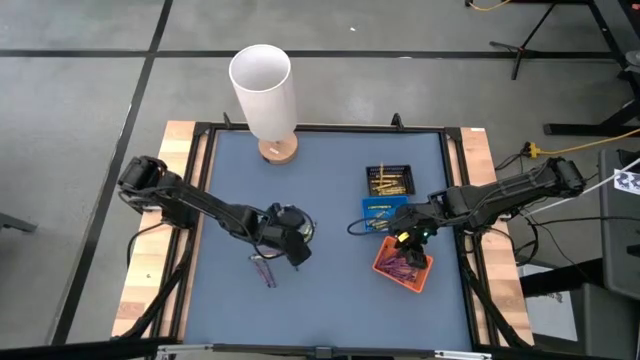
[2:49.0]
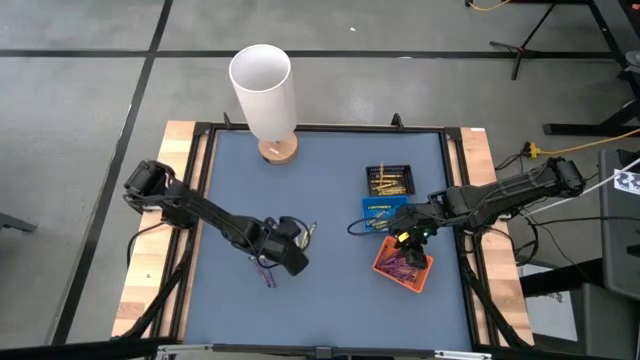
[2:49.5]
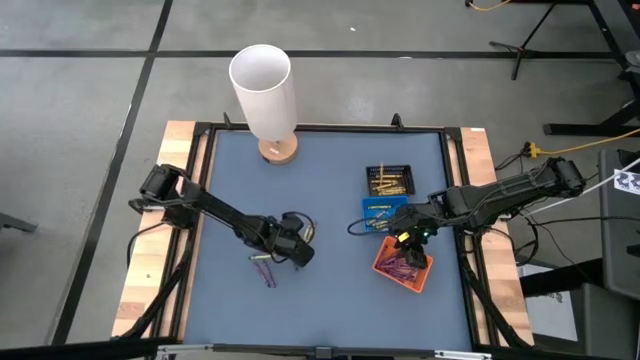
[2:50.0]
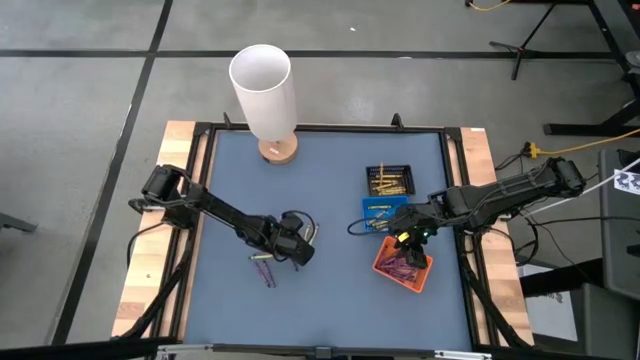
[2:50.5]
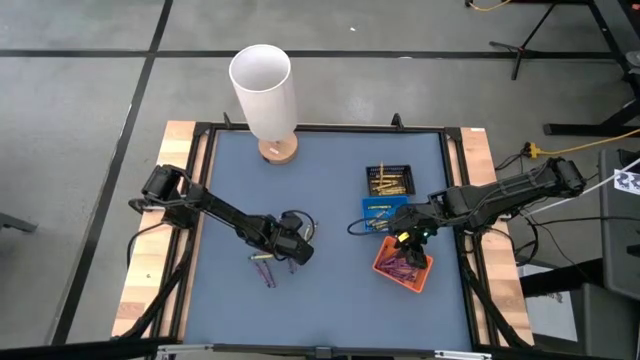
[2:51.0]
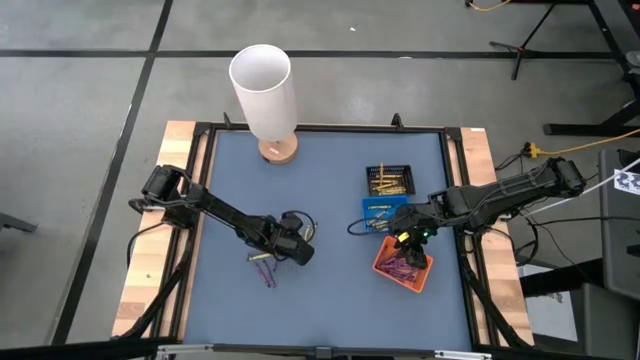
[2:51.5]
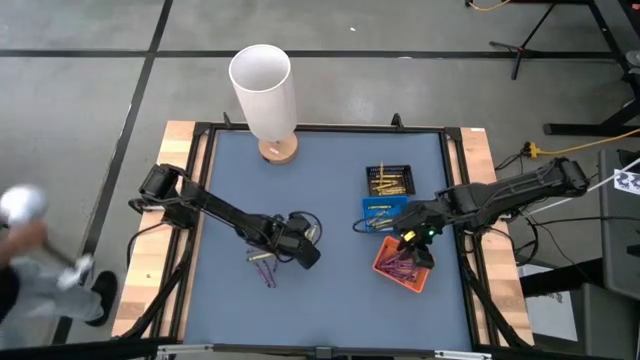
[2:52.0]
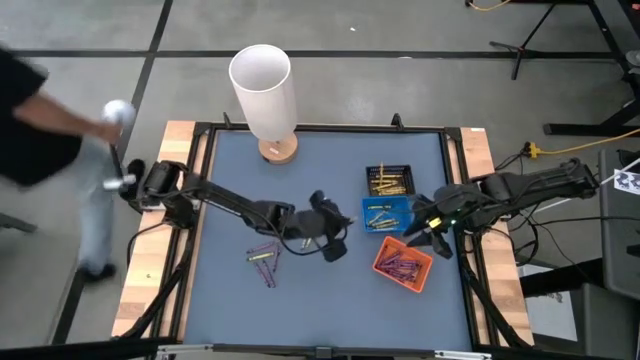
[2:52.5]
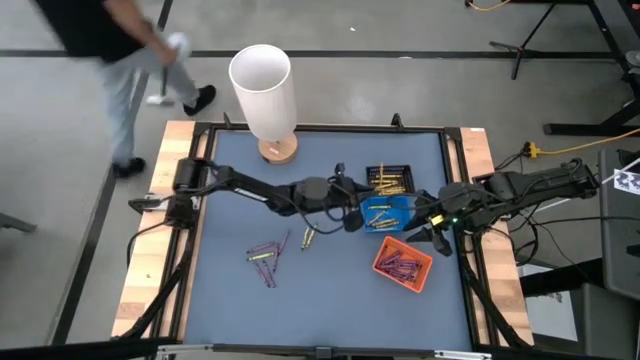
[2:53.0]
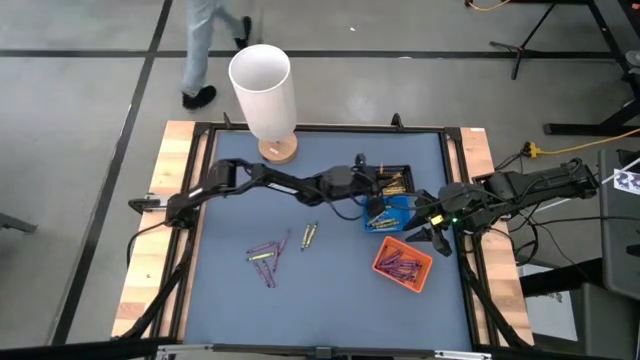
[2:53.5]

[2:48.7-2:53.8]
Task: Sort crayons
Put the yellow crayon into the black bin

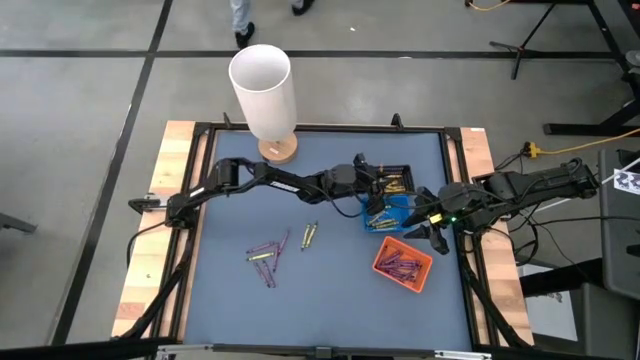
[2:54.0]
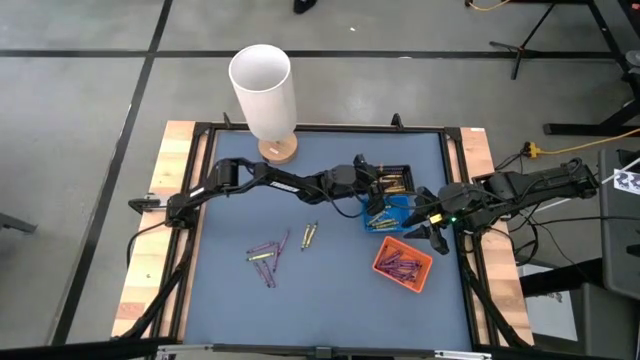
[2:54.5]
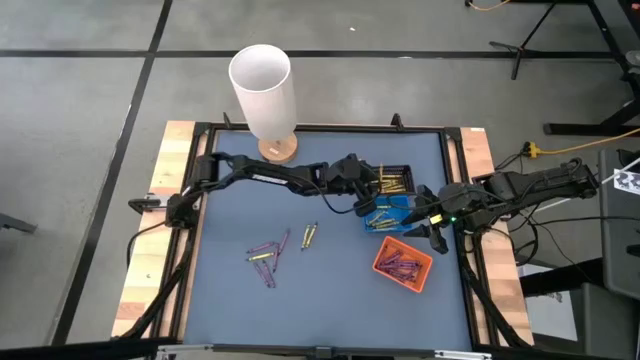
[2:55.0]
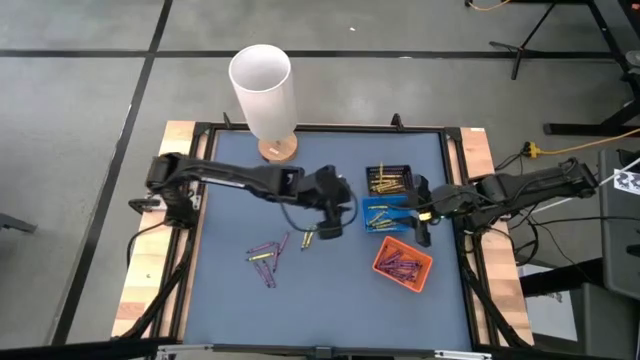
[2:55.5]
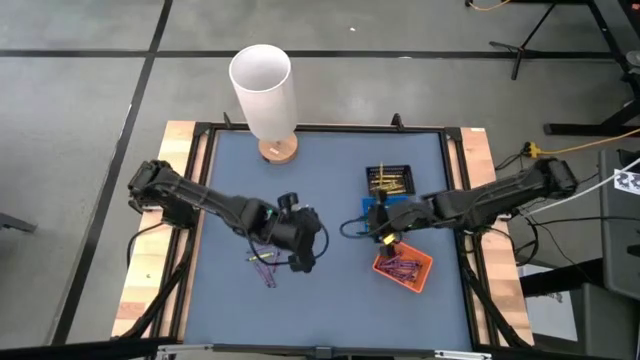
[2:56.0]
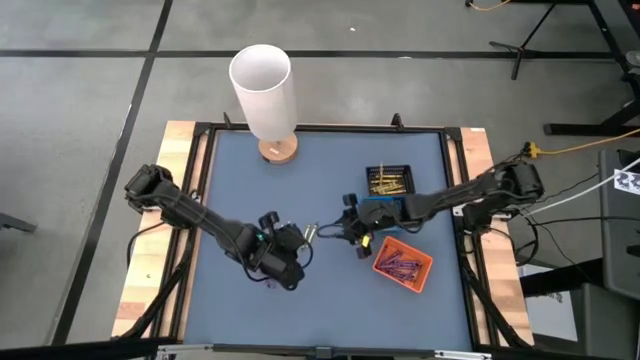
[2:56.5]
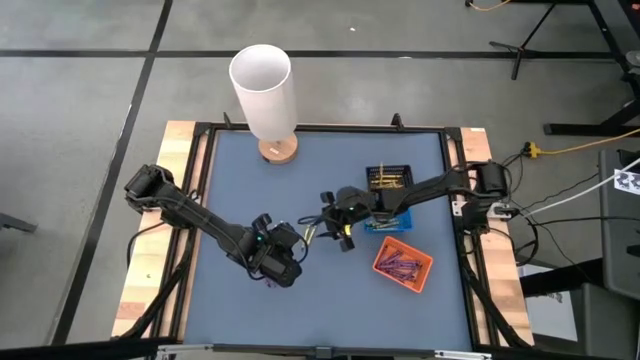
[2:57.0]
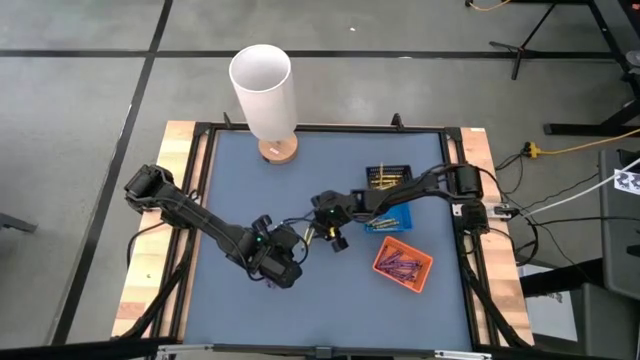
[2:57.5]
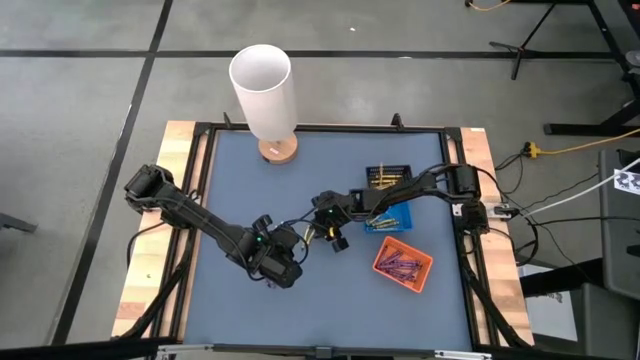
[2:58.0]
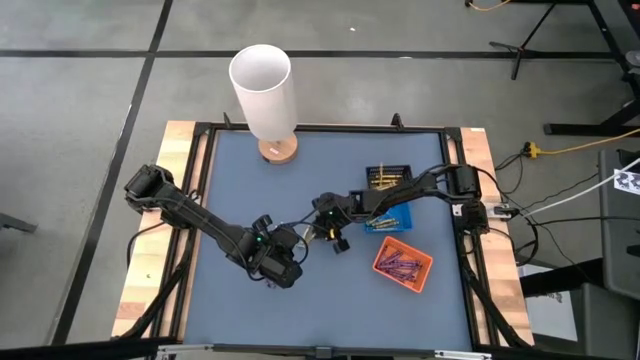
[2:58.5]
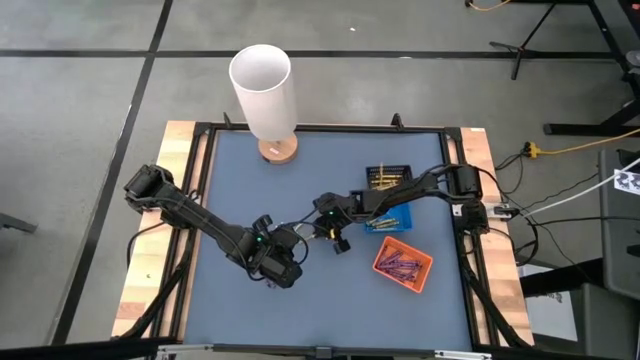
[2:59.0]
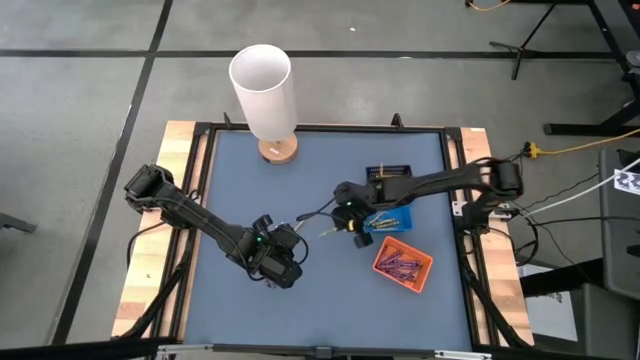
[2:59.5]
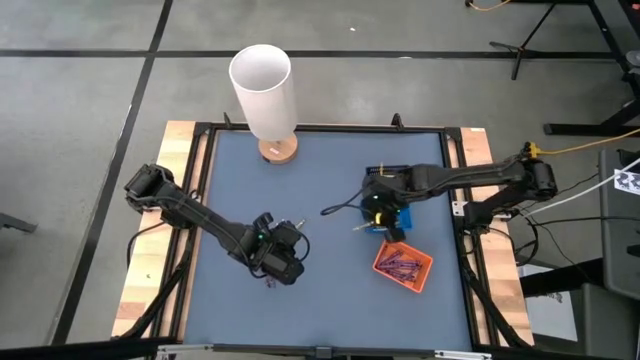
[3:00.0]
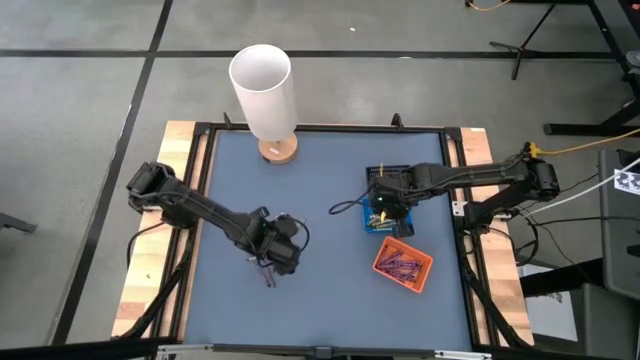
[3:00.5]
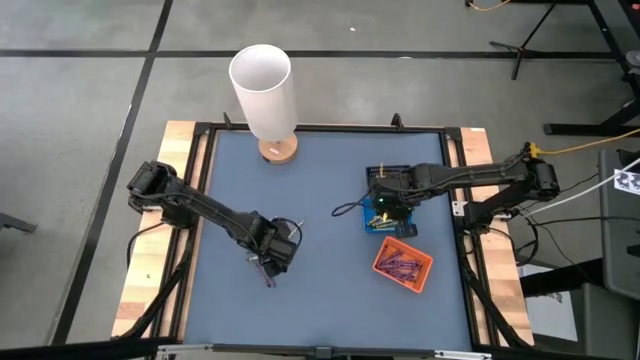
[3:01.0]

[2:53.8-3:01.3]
Put the green crayon into the blue bin

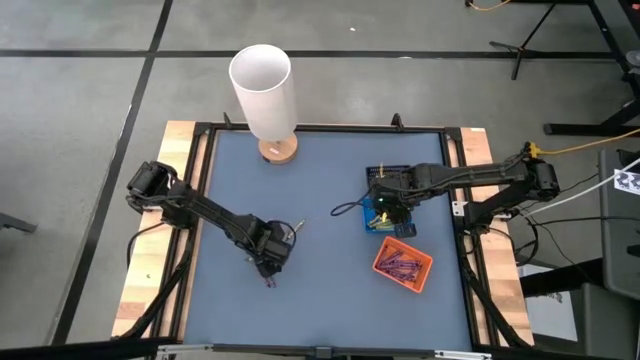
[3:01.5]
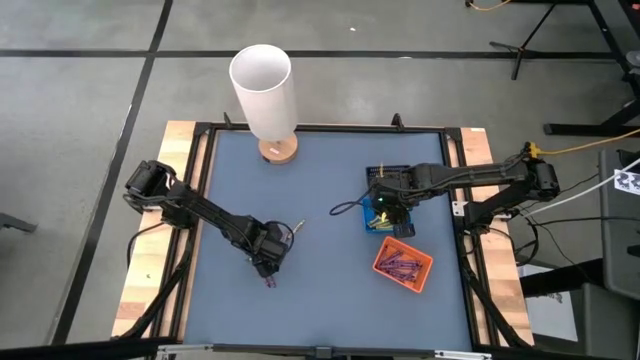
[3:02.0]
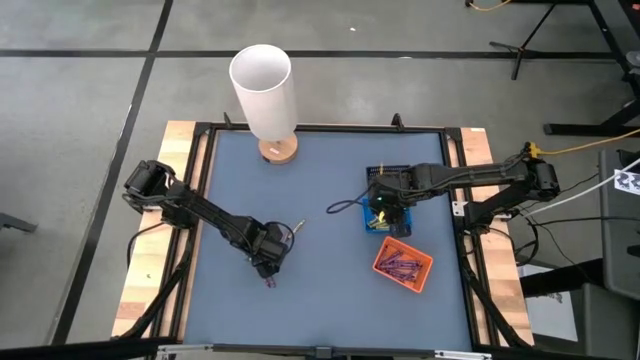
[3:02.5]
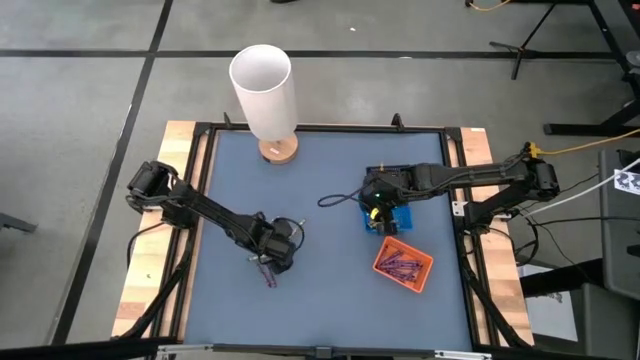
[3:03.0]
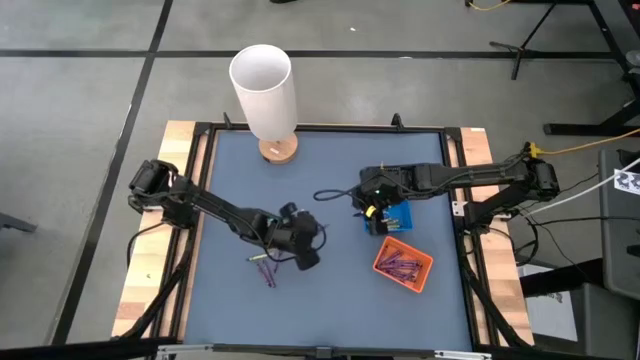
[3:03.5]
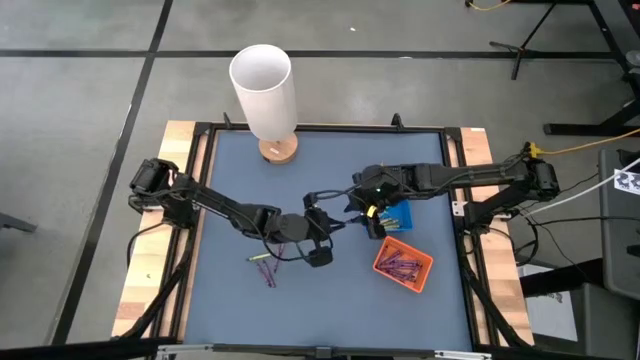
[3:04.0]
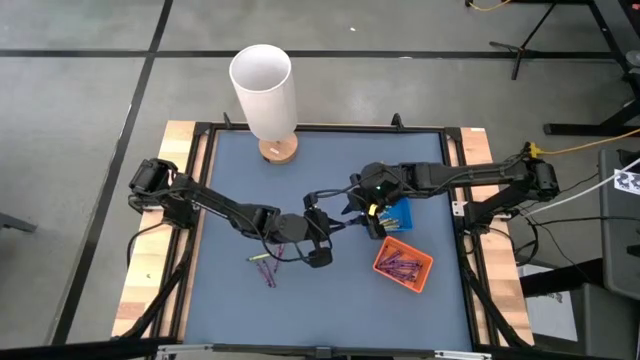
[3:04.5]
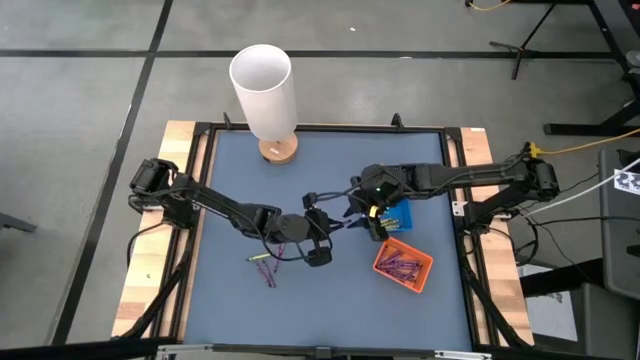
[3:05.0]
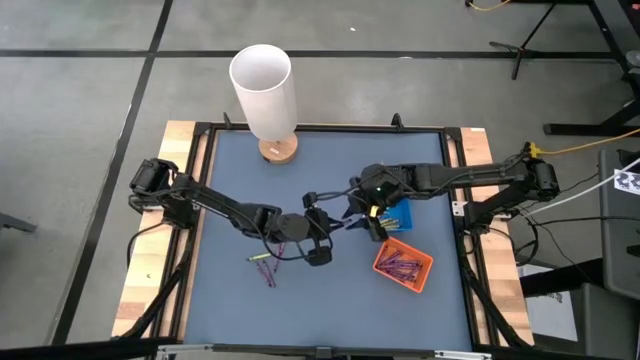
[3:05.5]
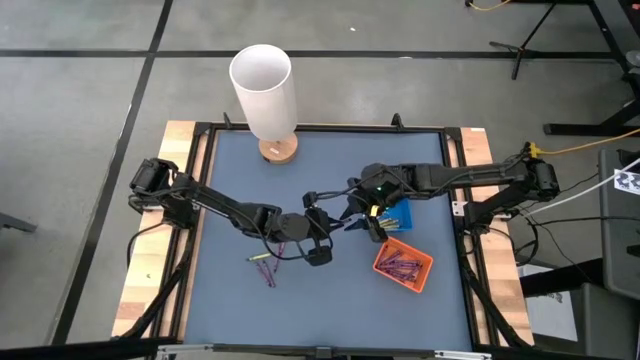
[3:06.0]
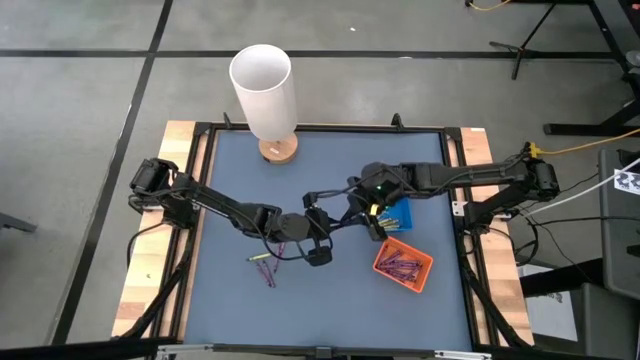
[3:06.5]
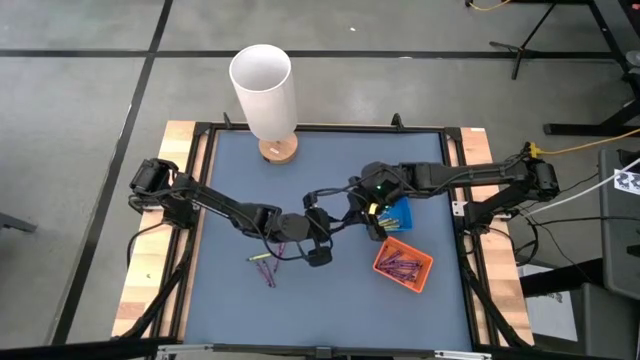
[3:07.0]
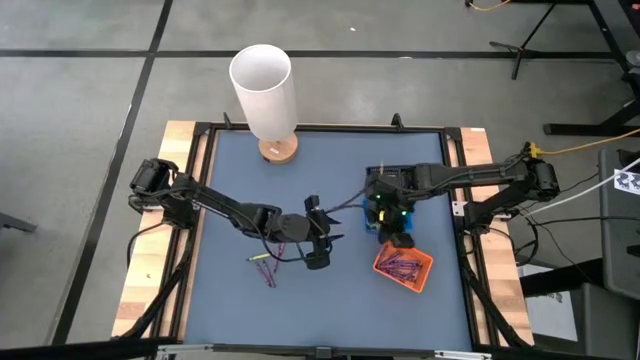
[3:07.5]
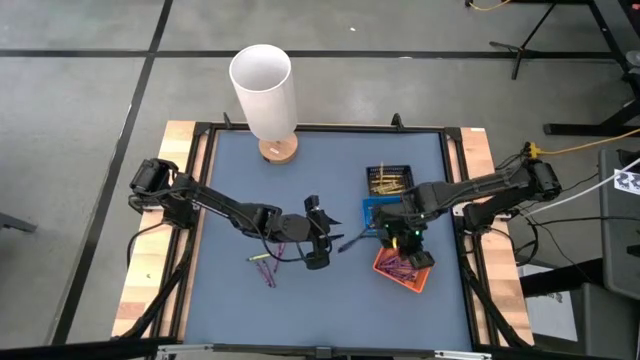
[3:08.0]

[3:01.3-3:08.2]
Put the purple crayon into the orange bin
